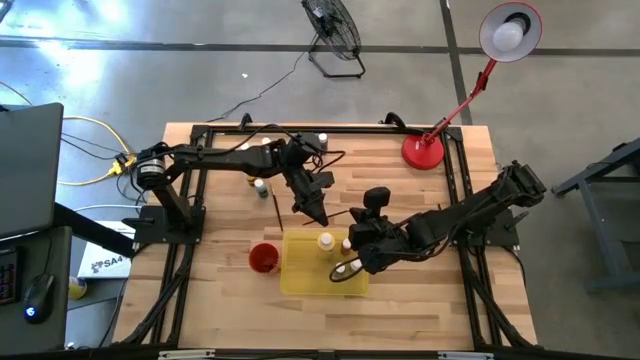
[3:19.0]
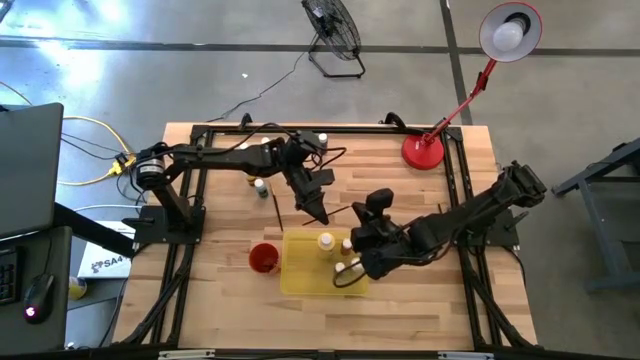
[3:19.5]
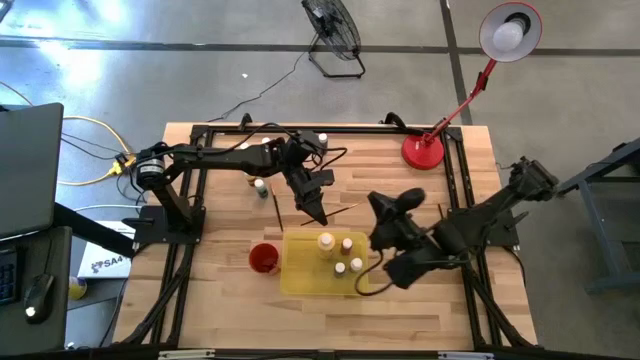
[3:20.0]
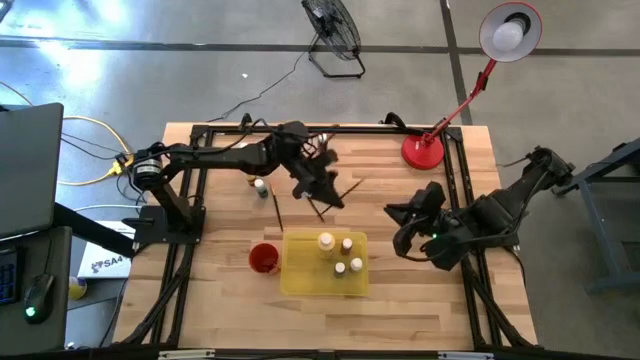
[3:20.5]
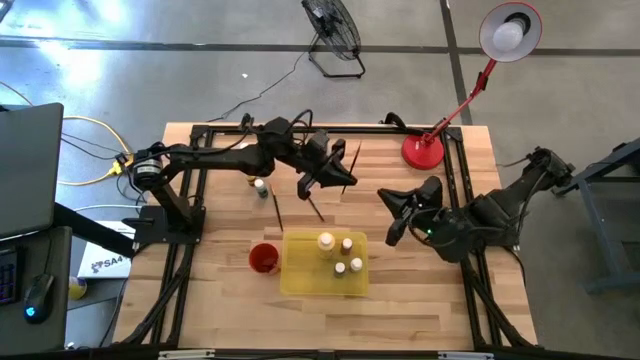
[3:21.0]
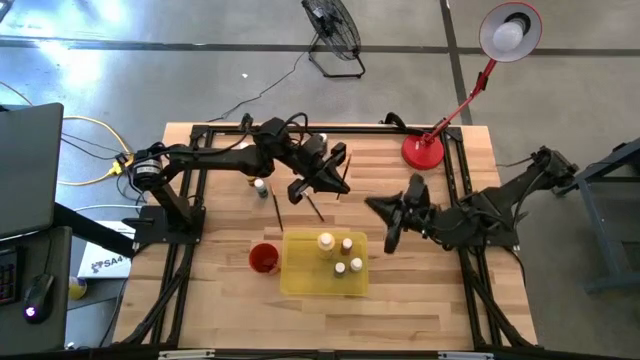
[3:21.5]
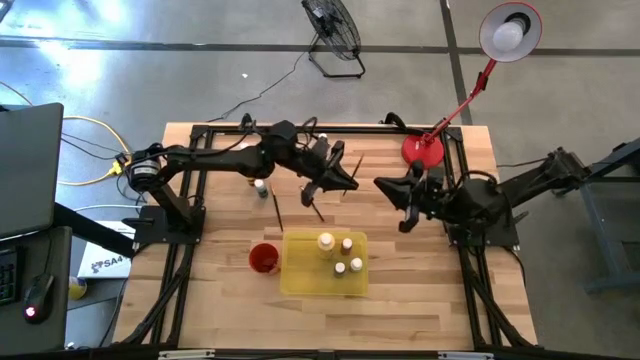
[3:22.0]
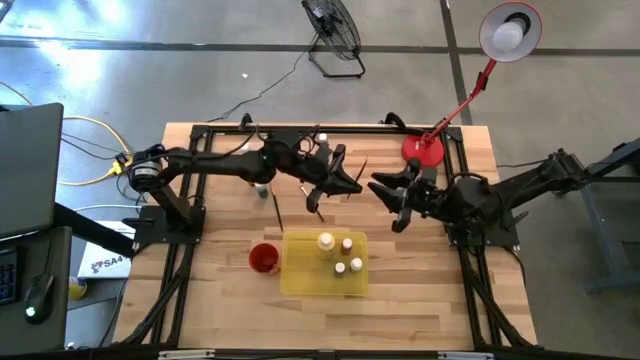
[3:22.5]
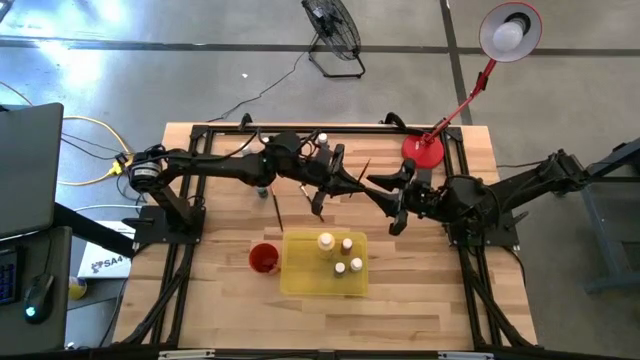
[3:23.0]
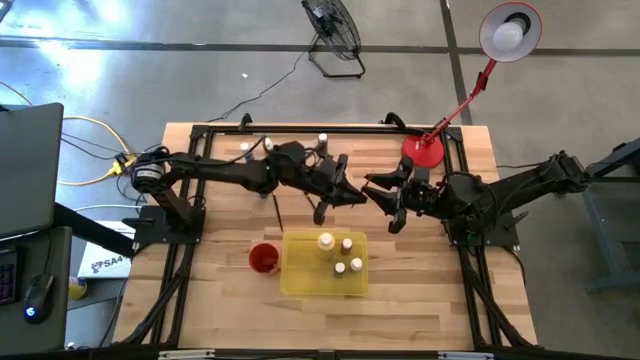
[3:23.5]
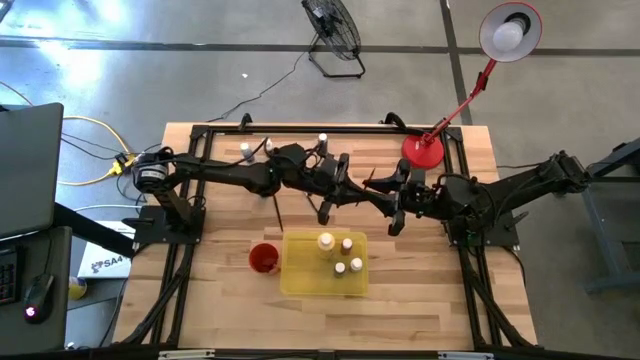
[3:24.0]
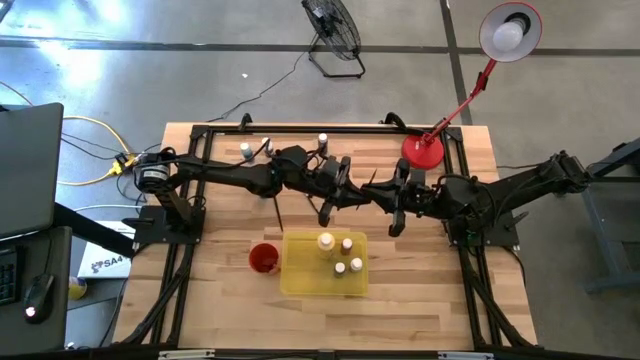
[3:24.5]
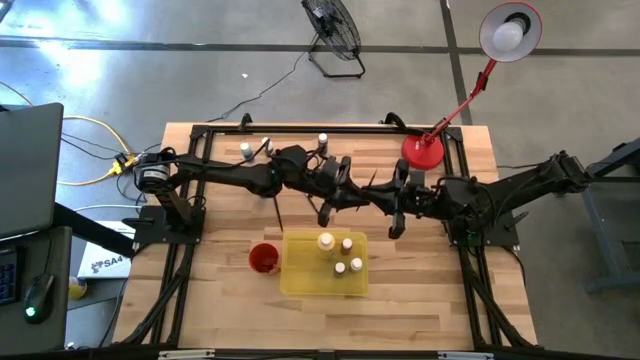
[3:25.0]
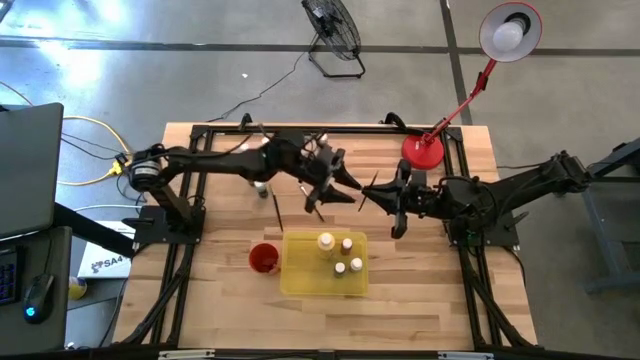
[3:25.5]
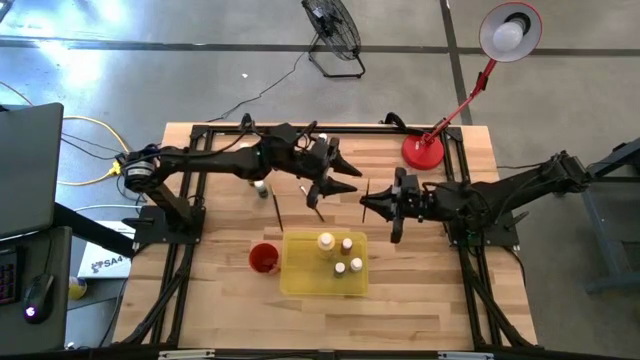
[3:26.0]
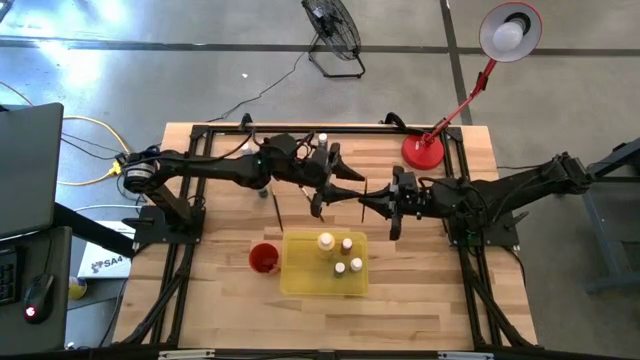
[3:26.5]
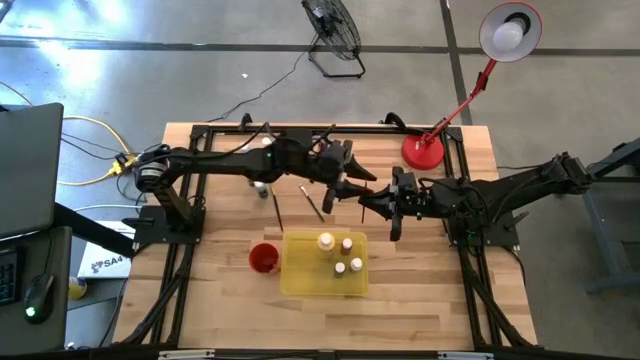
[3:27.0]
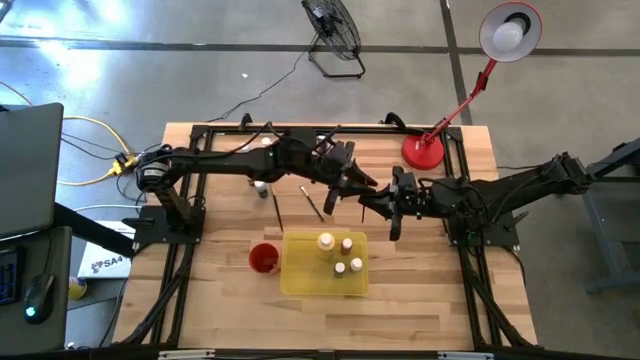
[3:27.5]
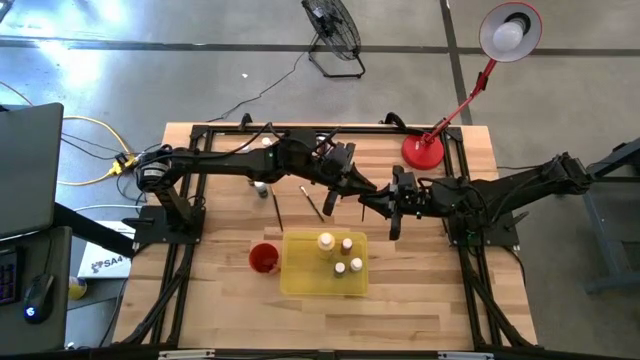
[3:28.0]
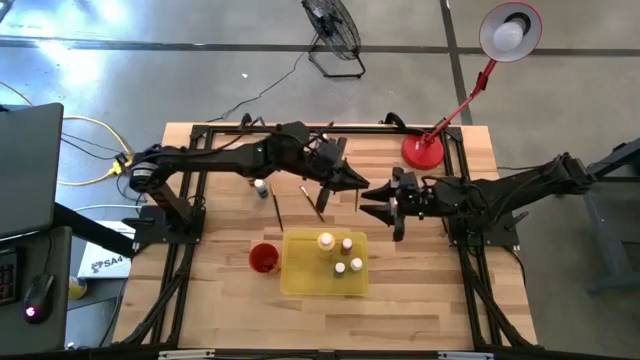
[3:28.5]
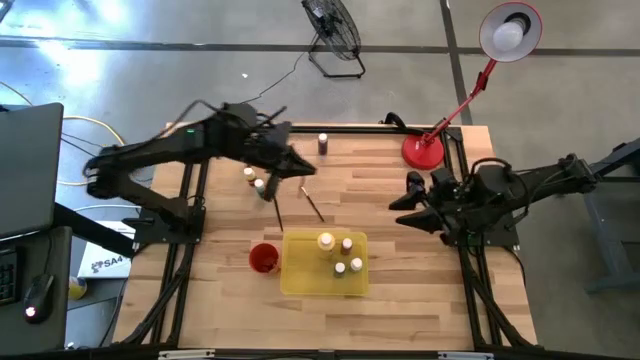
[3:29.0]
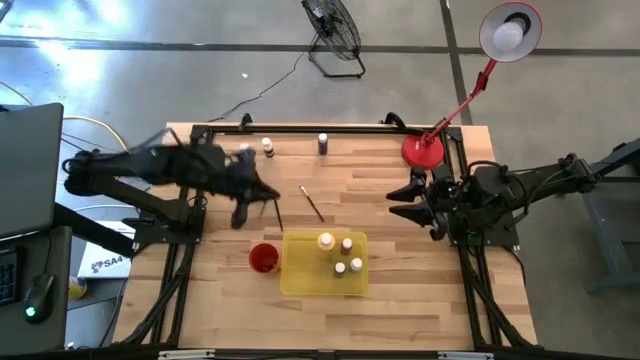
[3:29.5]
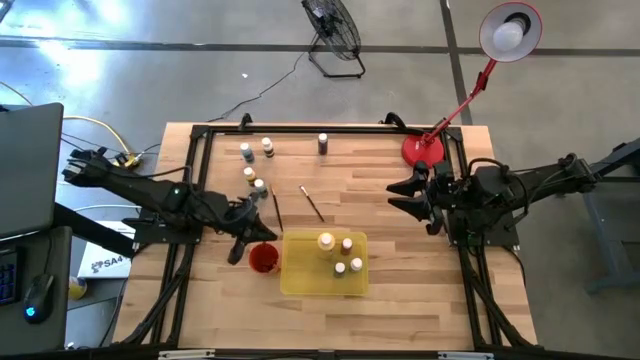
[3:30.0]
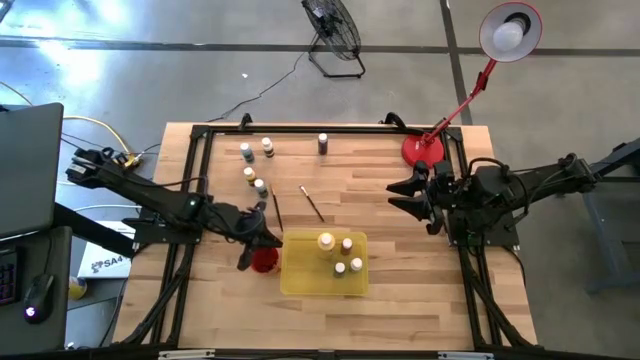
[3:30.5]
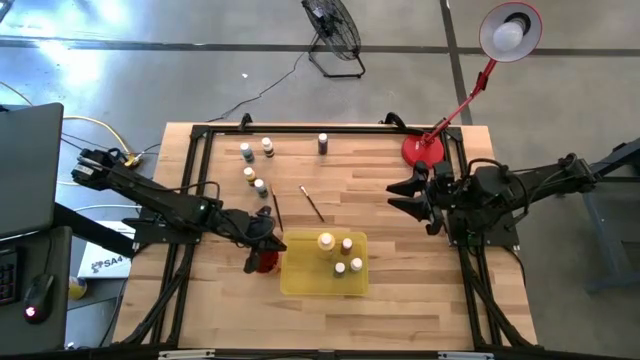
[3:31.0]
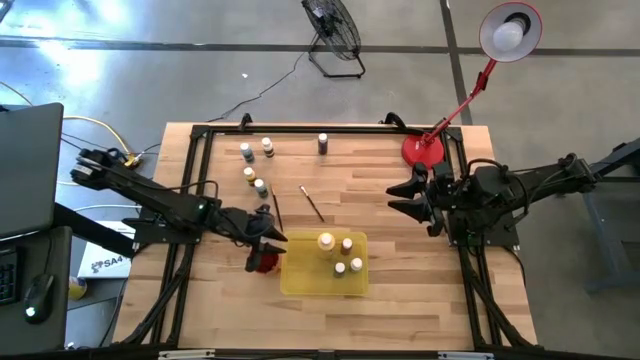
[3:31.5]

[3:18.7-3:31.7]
Task: Pick & Place Paint Supplies
Put the golden paintbrush into the orange cup
